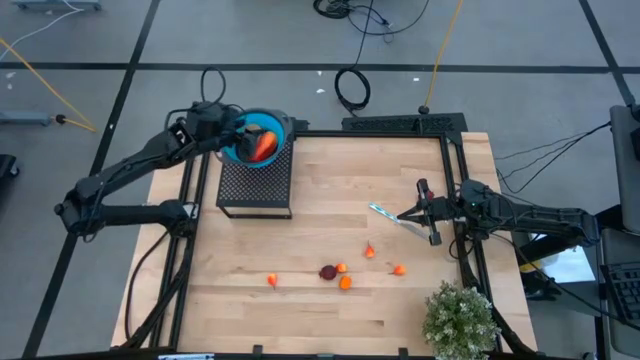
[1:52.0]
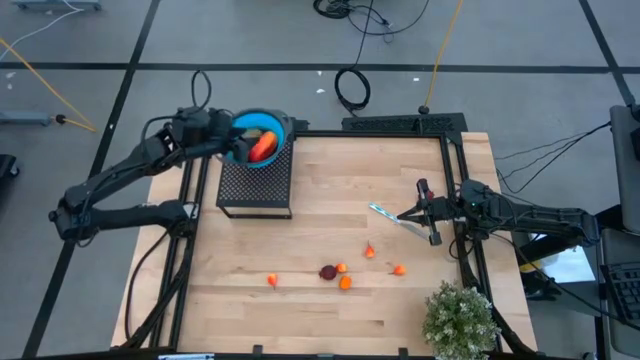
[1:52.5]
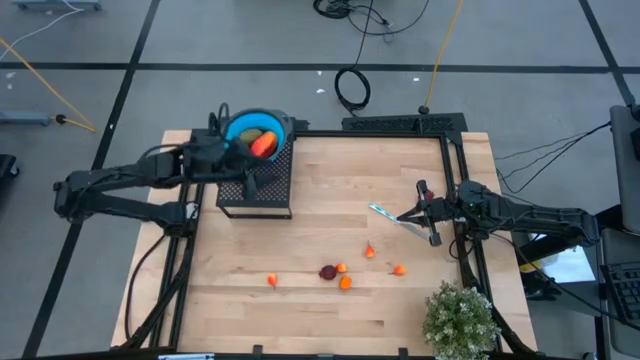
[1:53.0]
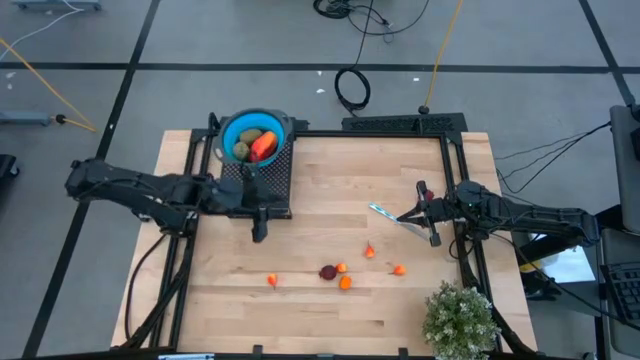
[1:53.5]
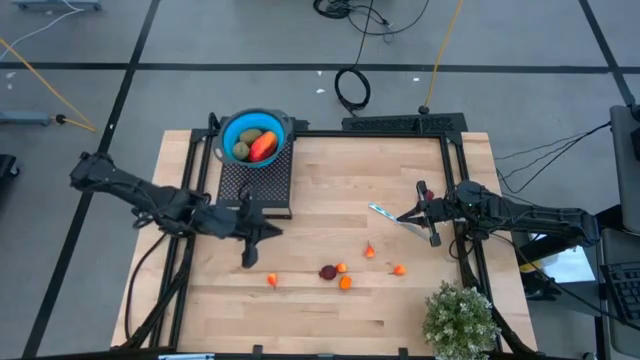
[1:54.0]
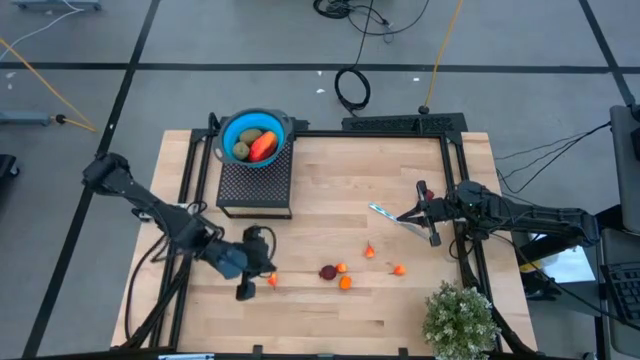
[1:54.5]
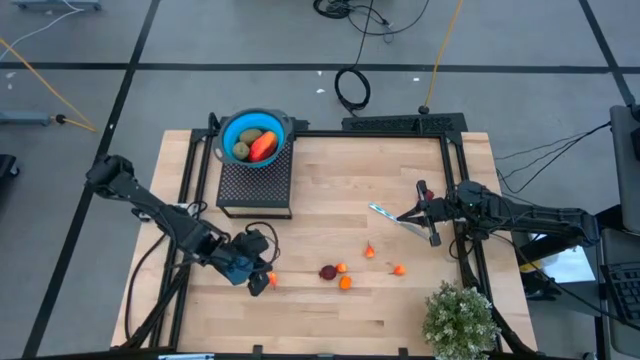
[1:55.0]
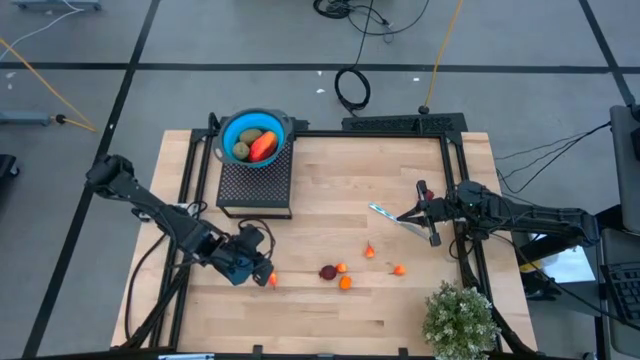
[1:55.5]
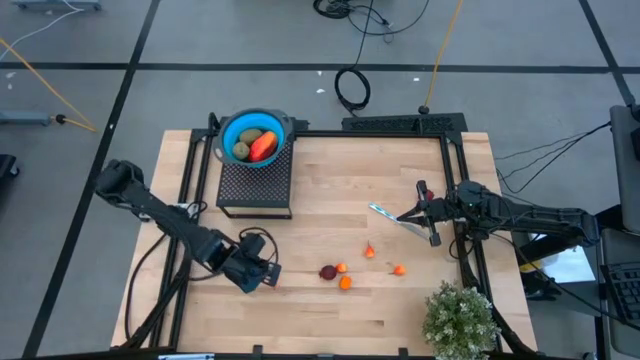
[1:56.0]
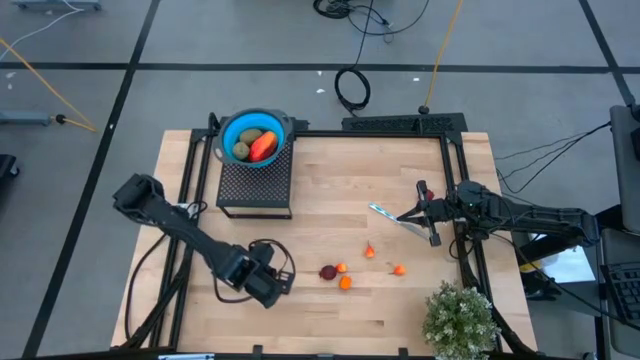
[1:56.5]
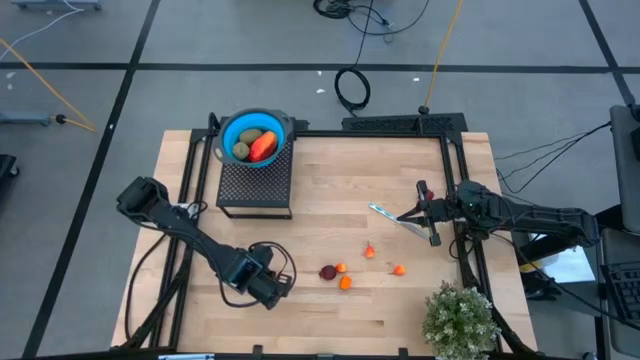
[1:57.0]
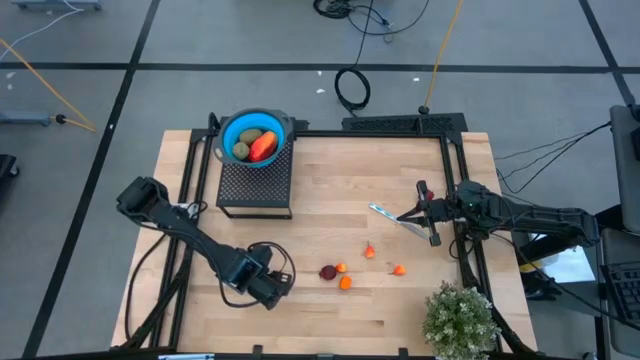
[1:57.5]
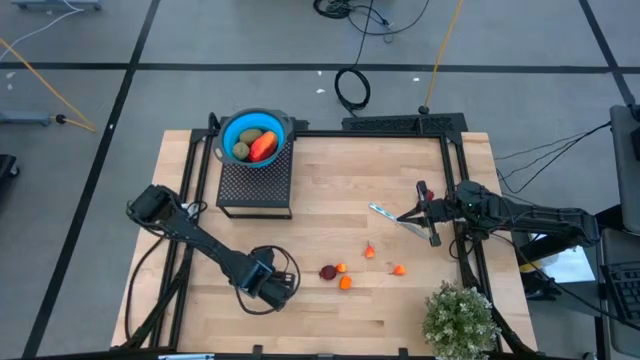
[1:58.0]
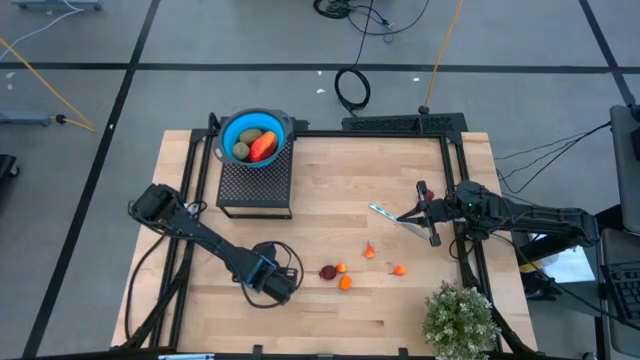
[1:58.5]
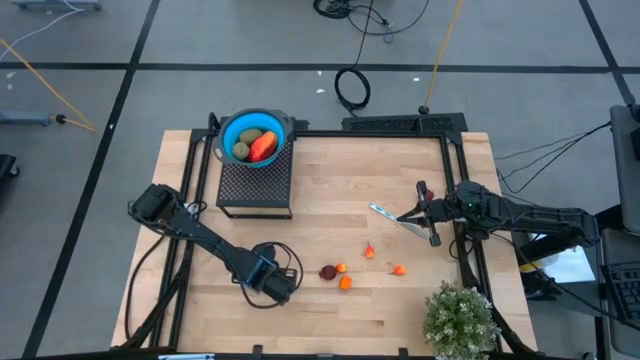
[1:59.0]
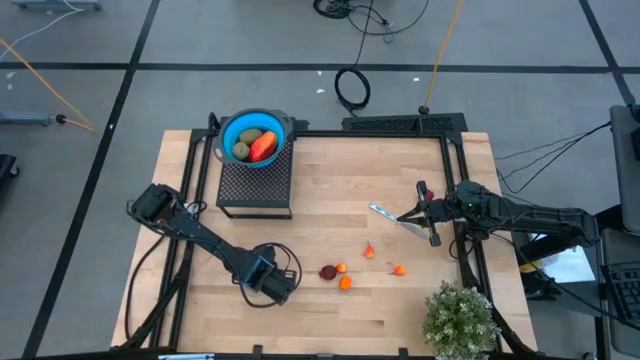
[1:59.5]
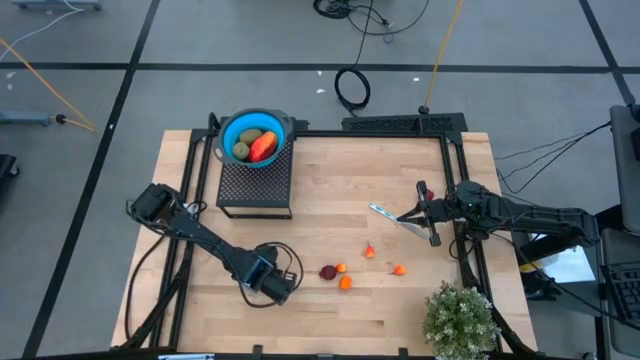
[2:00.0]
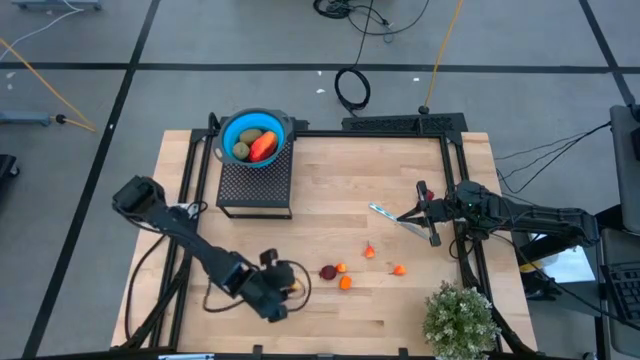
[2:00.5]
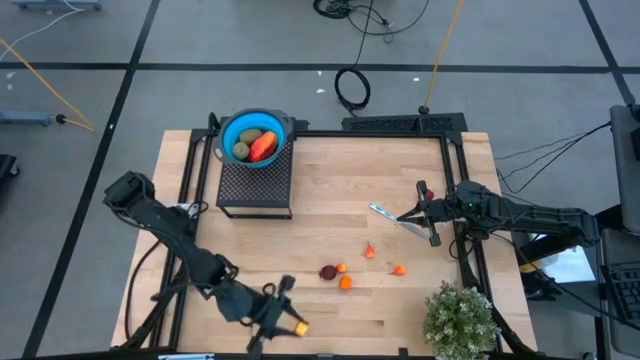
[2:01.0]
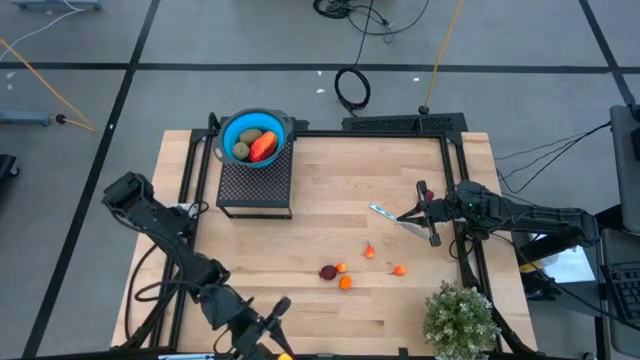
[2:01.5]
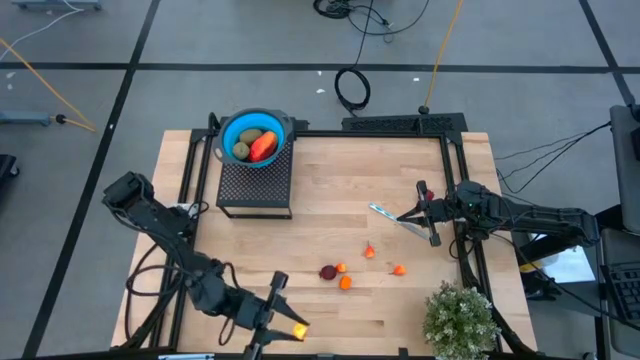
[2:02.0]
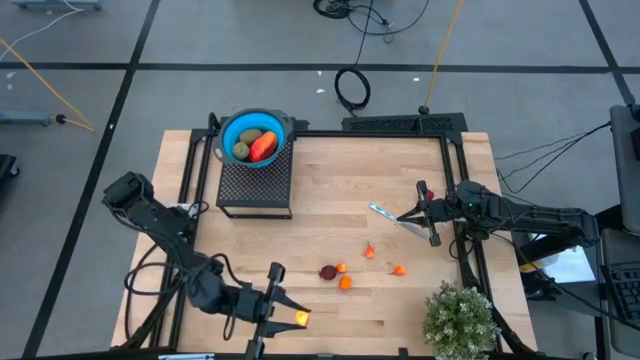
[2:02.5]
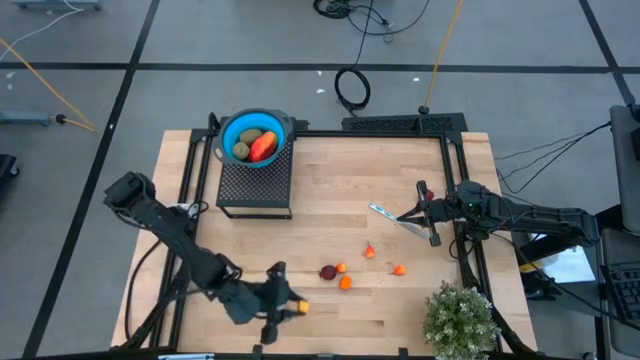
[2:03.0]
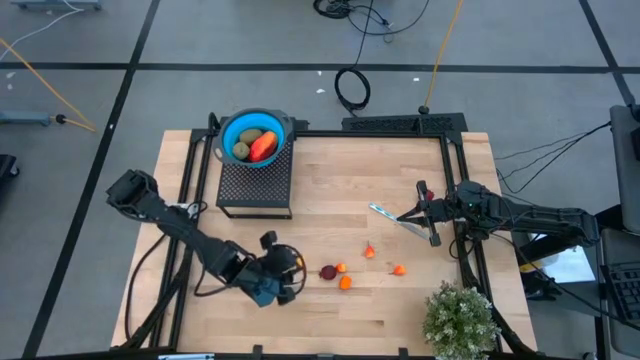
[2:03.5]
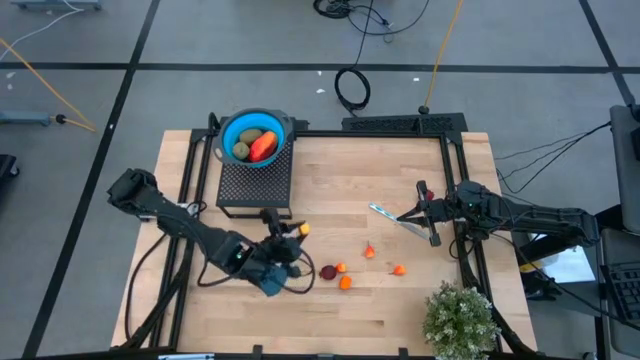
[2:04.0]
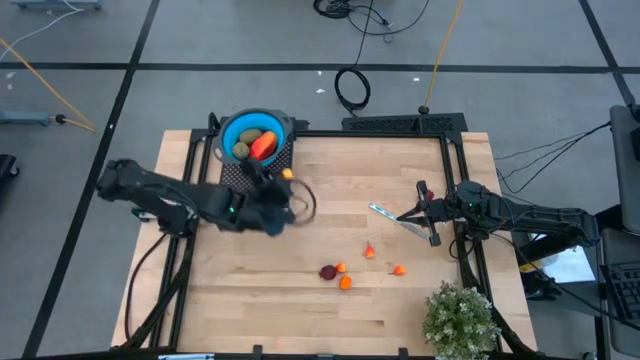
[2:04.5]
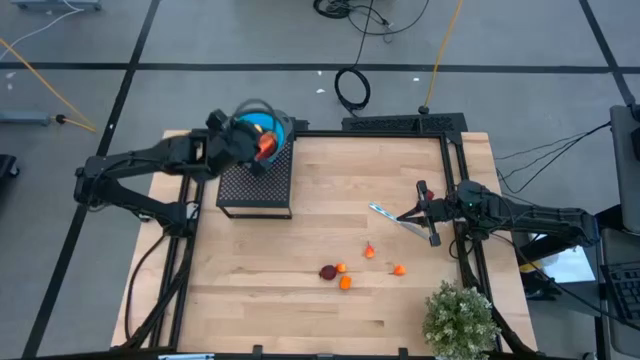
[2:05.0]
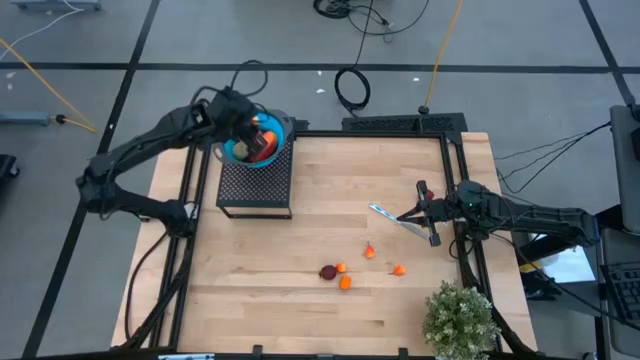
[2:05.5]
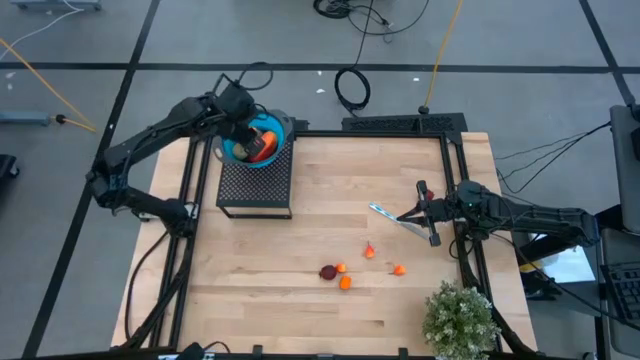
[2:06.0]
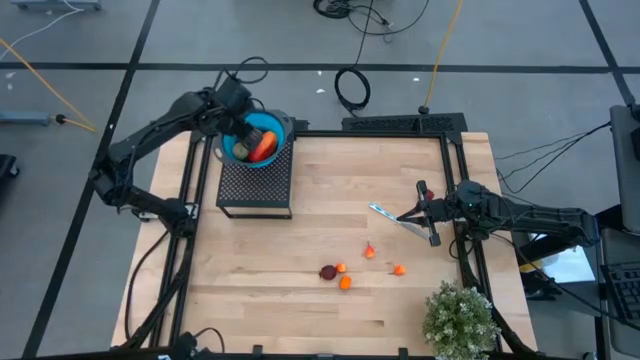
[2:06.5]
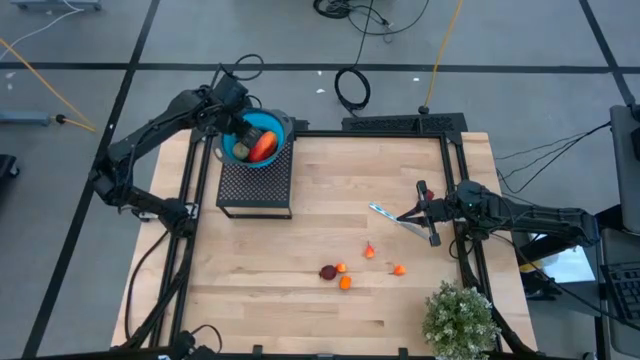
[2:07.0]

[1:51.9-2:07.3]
Task: Pick & Place Fruit
Put the yellow pear into the blue strainer bowl on the shelf

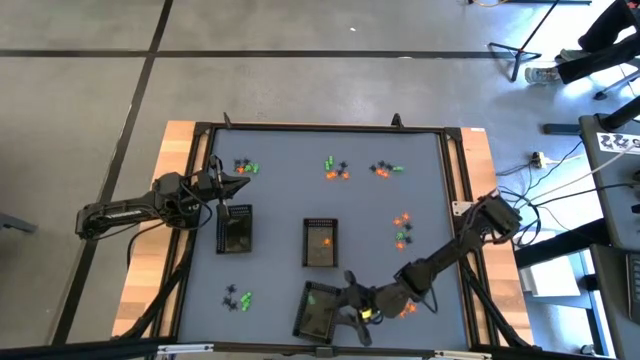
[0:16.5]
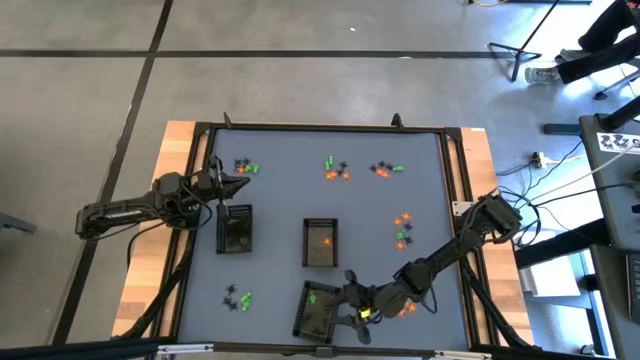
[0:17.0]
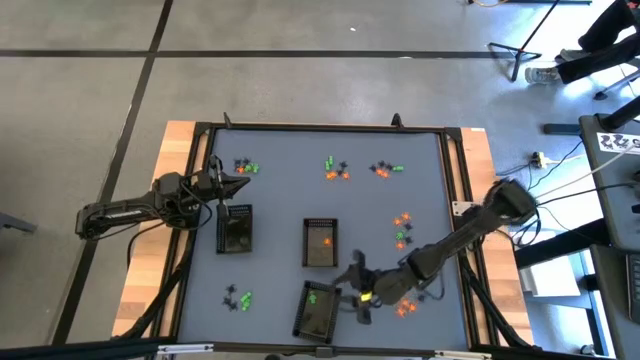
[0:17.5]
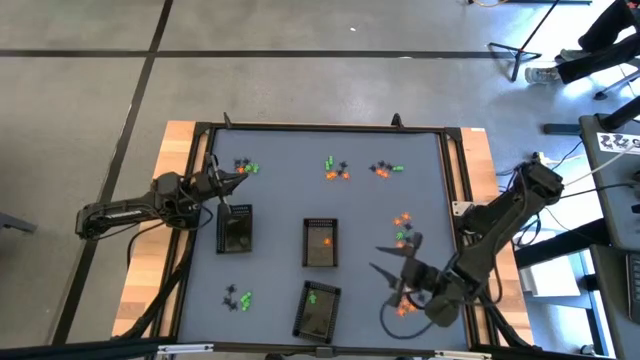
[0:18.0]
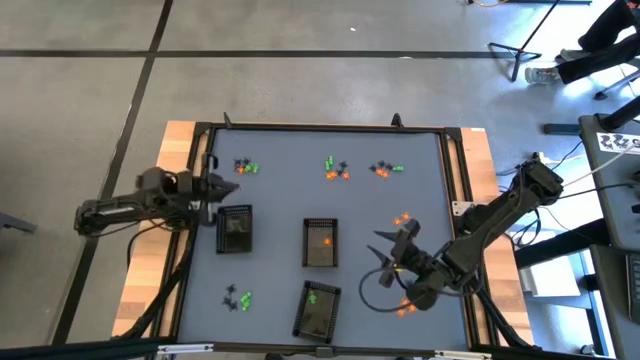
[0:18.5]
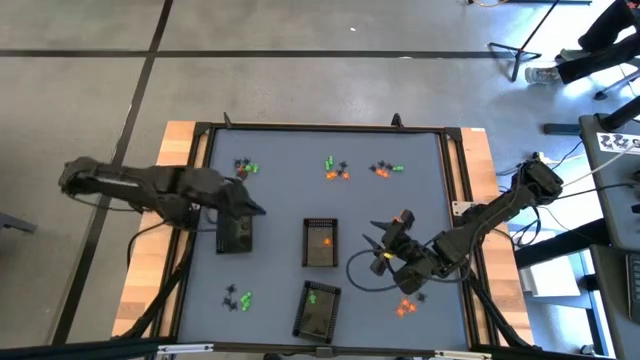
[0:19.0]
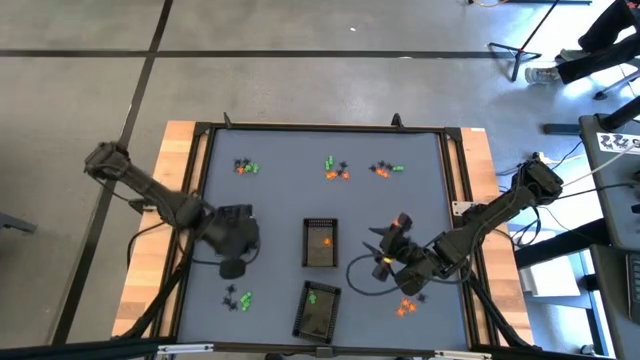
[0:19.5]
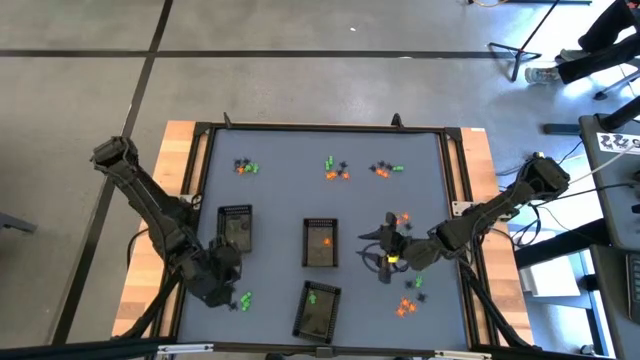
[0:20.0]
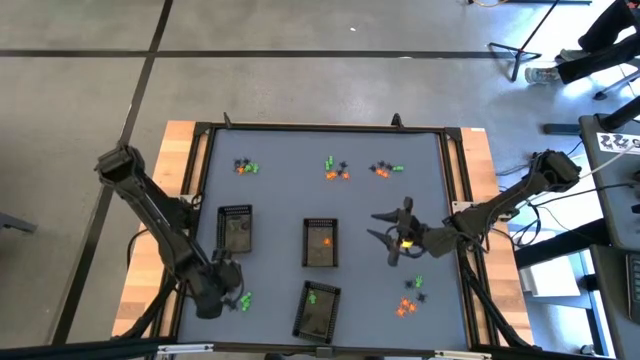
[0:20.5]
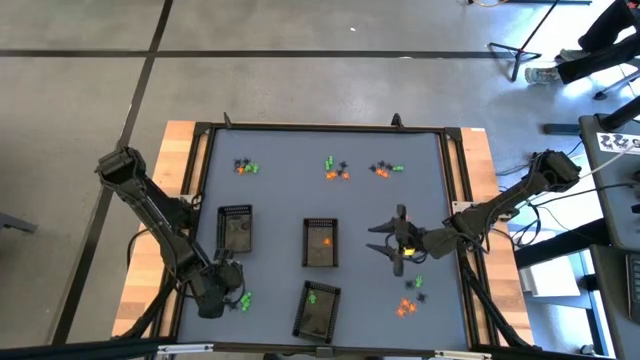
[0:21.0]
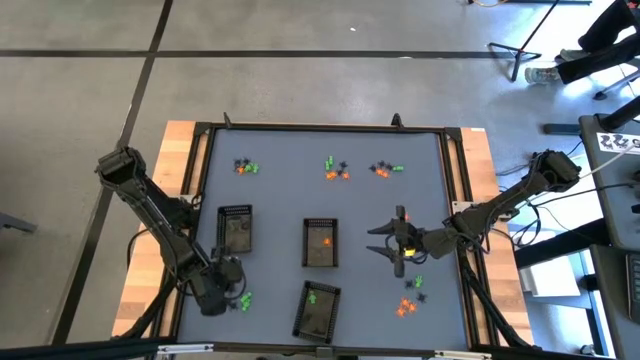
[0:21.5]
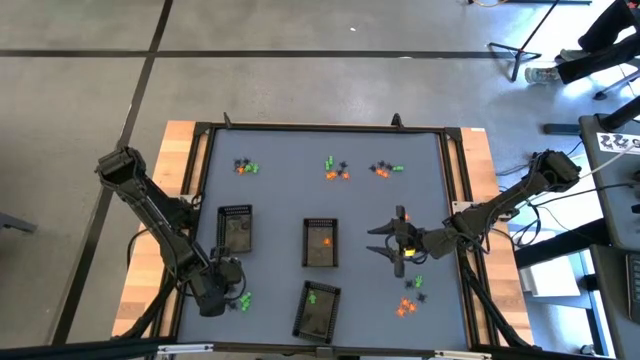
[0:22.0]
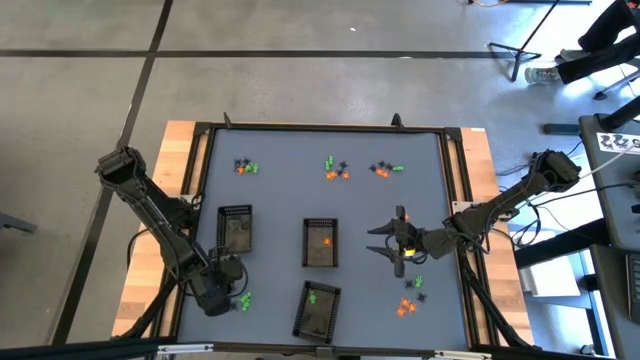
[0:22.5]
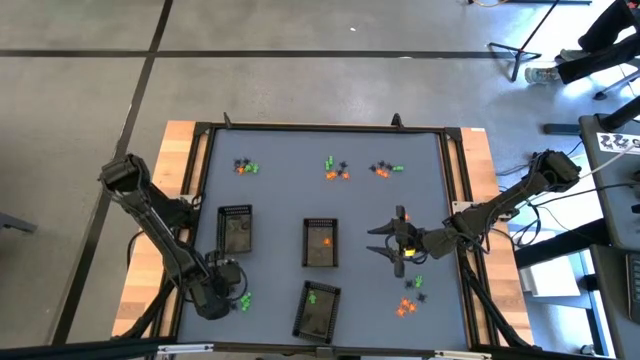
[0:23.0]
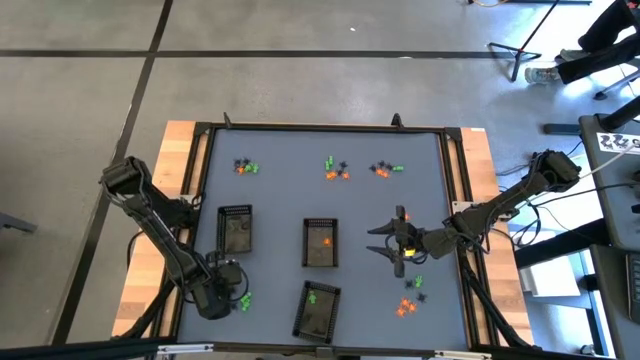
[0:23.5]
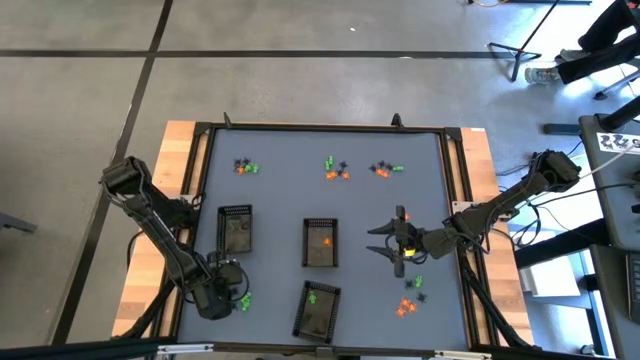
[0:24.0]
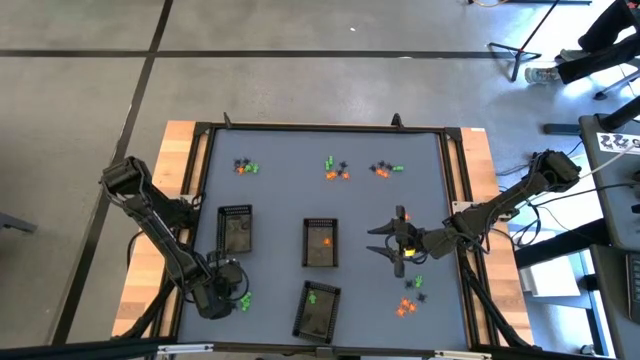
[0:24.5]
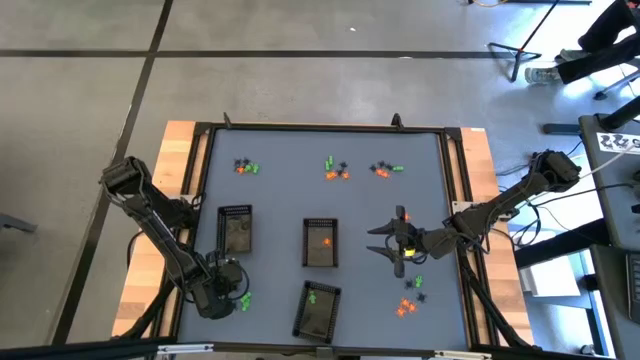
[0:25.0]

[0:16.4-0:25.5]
Task: Sort Halloween decoration
Put the black spider toy into the top left black basket
